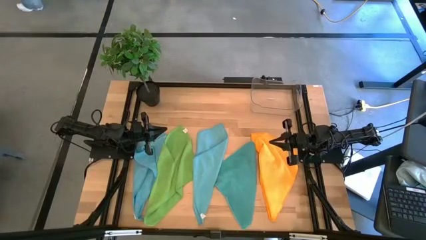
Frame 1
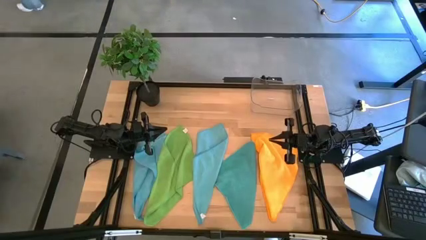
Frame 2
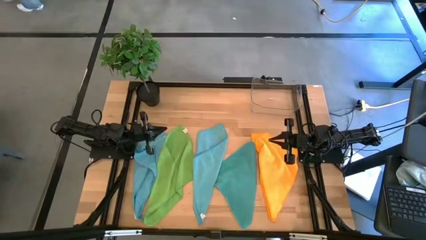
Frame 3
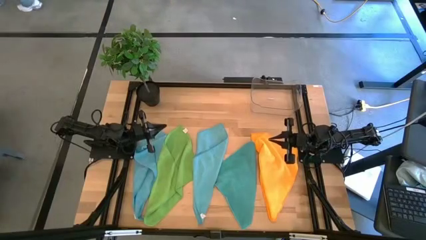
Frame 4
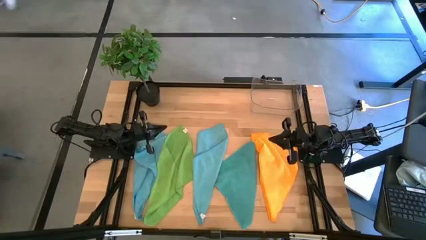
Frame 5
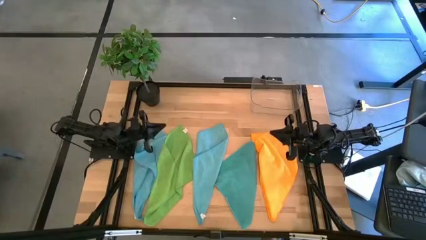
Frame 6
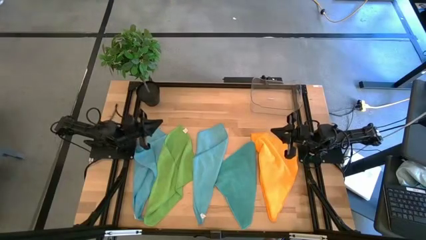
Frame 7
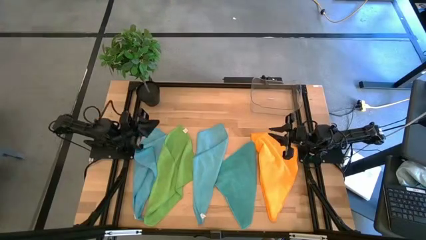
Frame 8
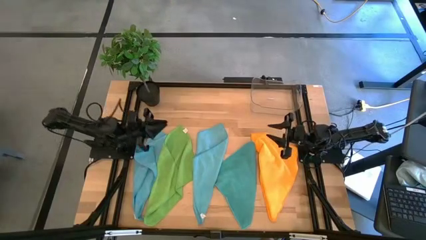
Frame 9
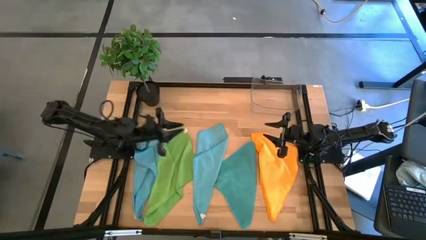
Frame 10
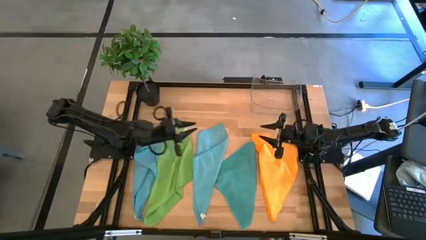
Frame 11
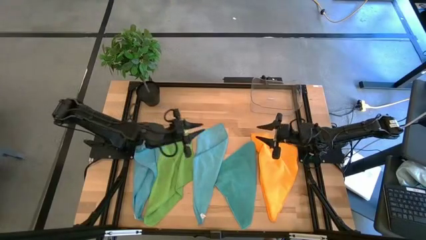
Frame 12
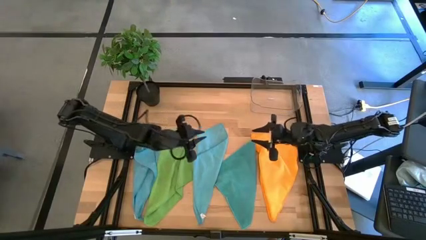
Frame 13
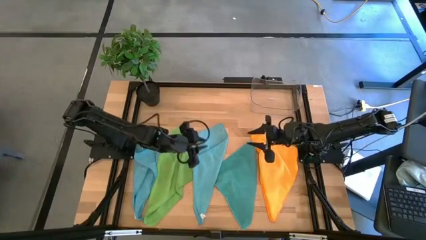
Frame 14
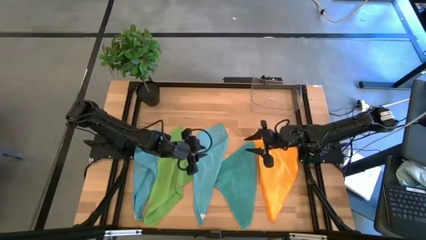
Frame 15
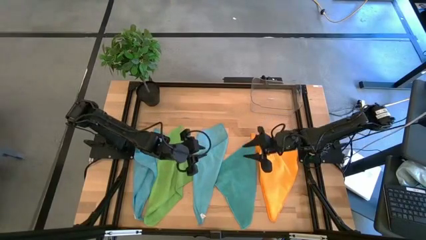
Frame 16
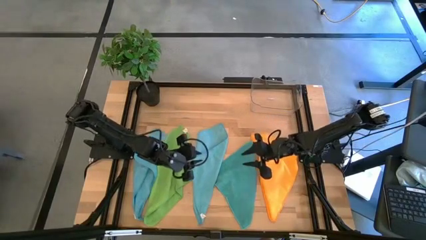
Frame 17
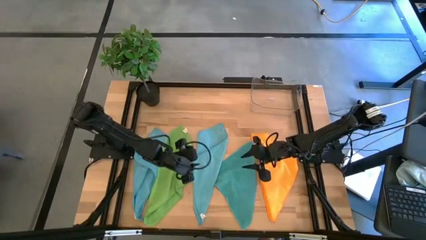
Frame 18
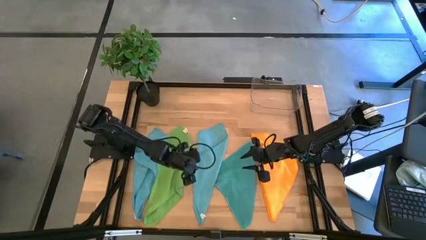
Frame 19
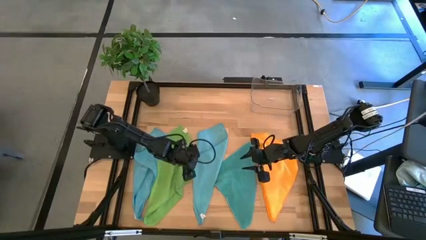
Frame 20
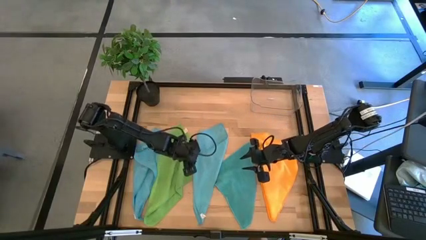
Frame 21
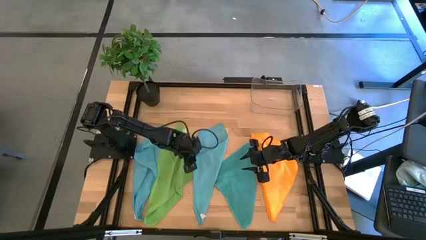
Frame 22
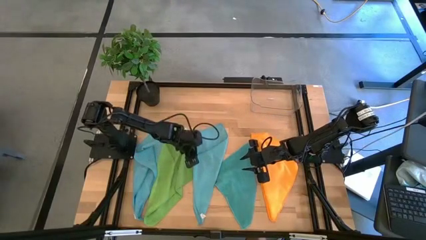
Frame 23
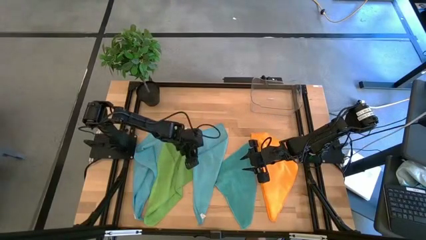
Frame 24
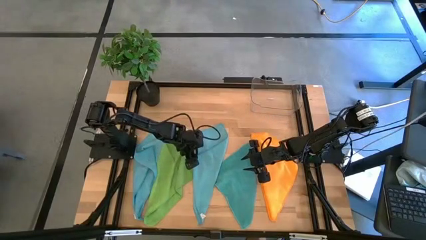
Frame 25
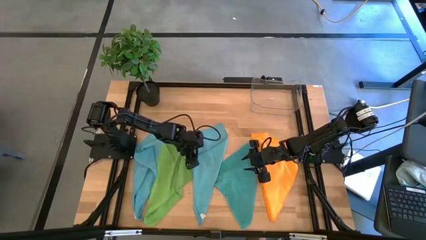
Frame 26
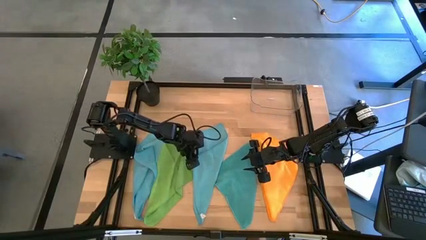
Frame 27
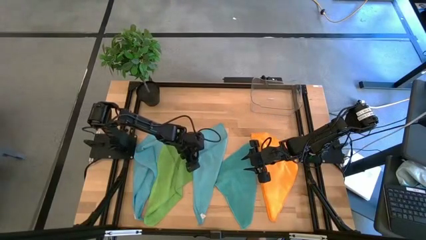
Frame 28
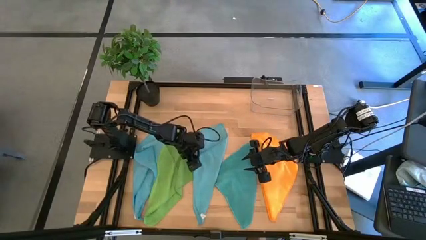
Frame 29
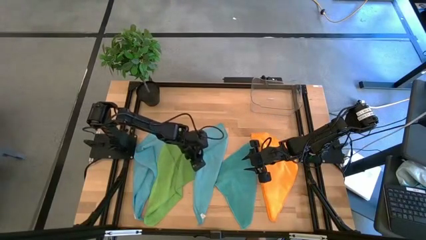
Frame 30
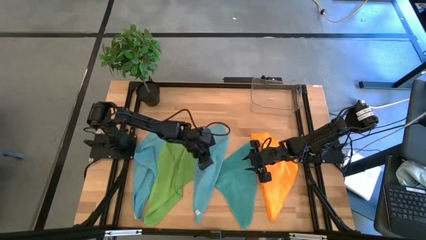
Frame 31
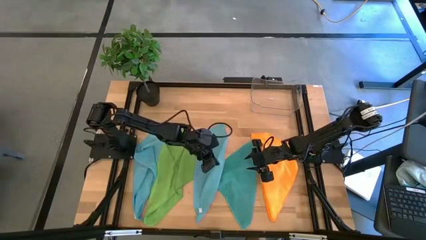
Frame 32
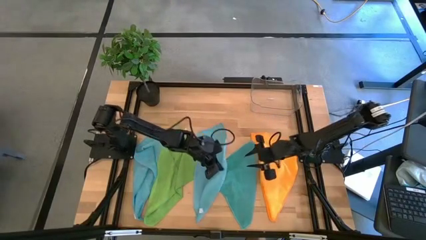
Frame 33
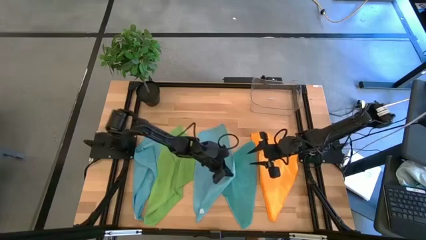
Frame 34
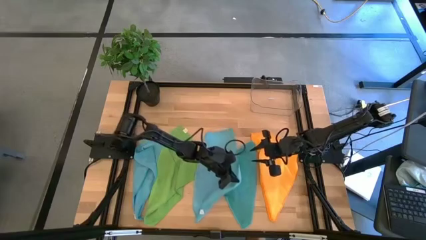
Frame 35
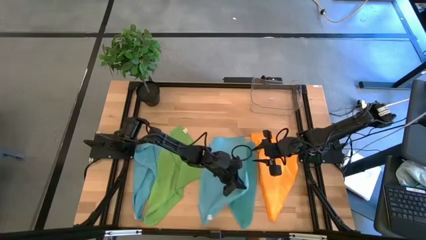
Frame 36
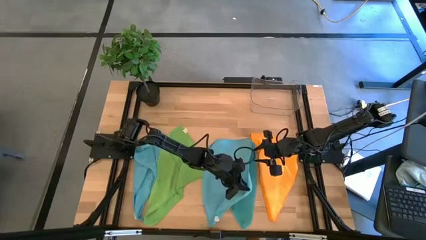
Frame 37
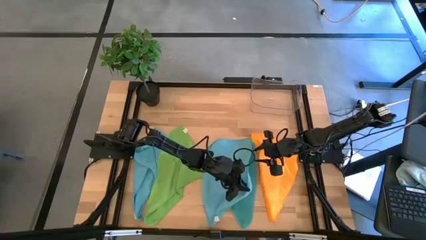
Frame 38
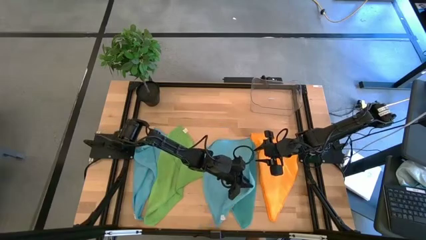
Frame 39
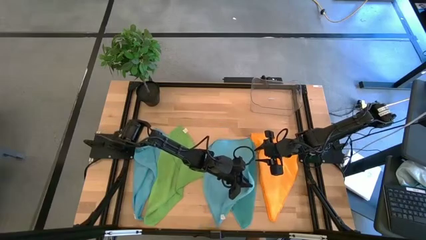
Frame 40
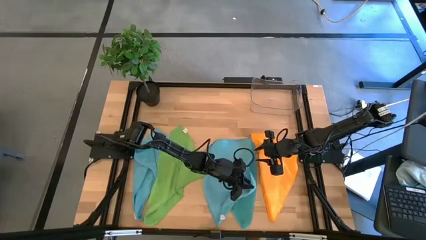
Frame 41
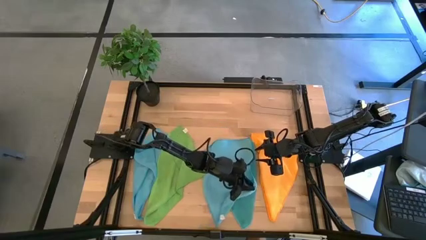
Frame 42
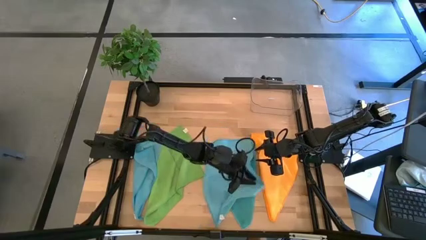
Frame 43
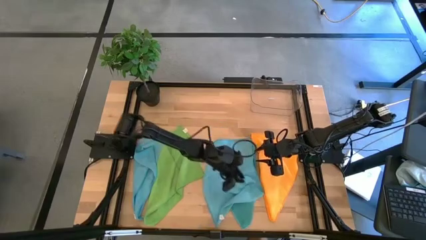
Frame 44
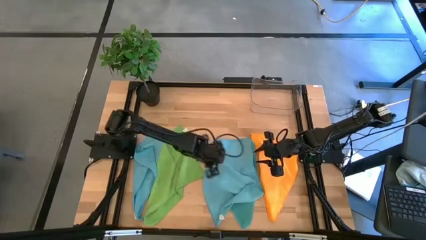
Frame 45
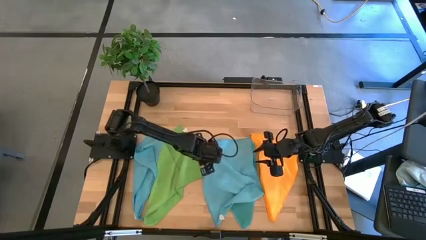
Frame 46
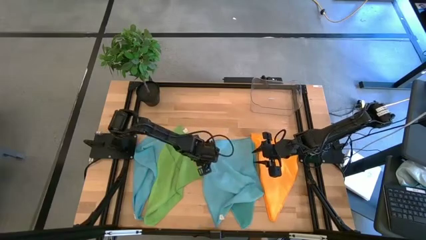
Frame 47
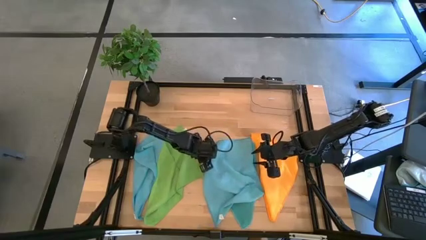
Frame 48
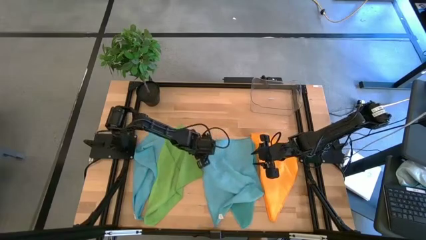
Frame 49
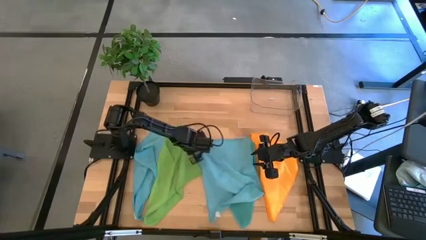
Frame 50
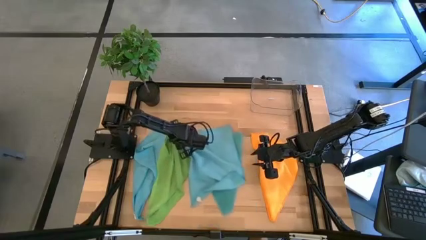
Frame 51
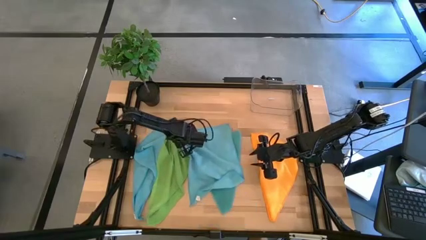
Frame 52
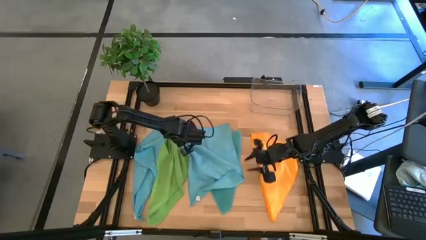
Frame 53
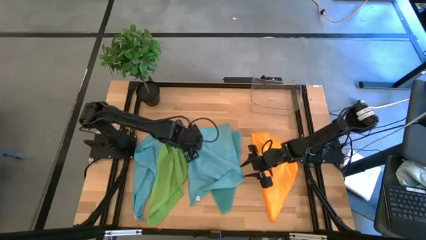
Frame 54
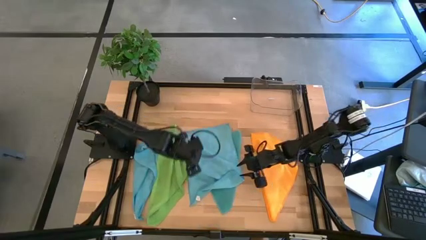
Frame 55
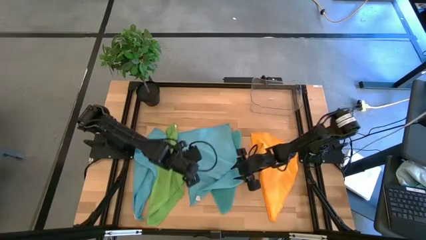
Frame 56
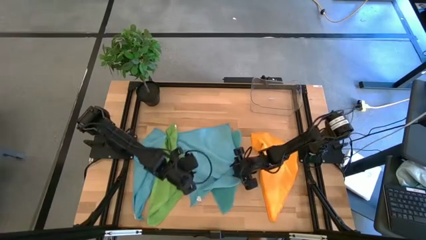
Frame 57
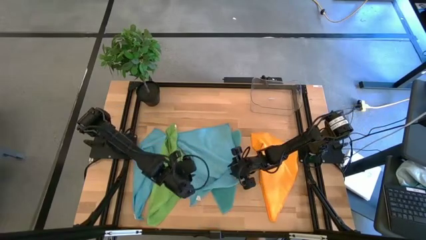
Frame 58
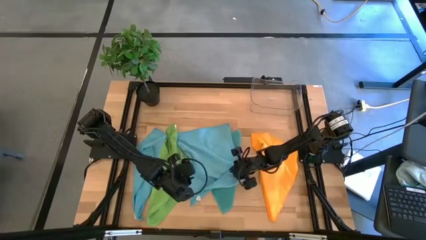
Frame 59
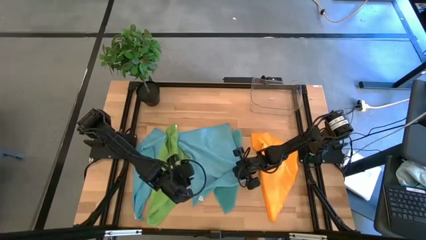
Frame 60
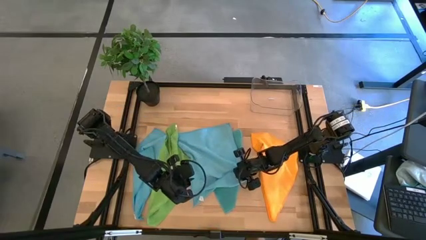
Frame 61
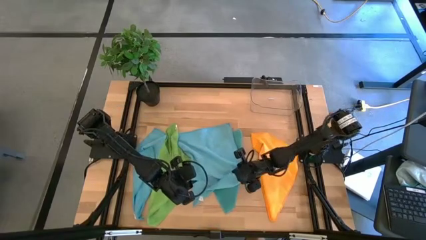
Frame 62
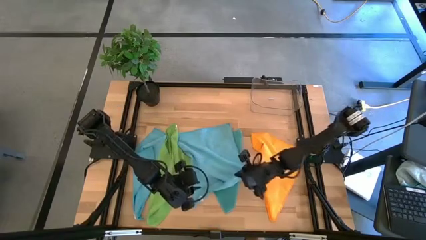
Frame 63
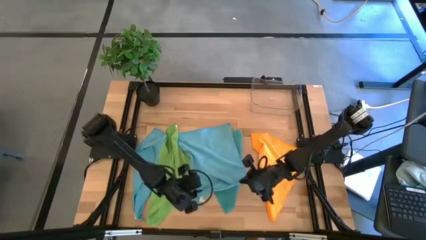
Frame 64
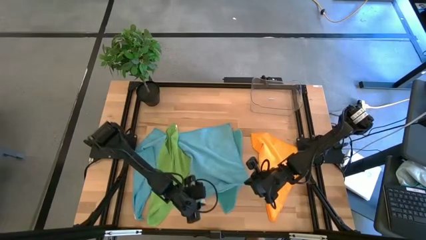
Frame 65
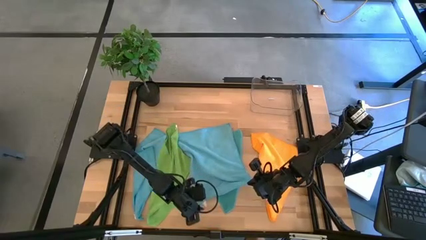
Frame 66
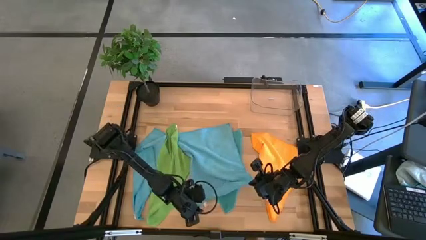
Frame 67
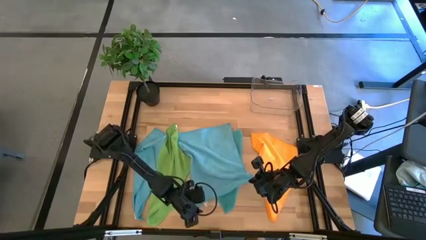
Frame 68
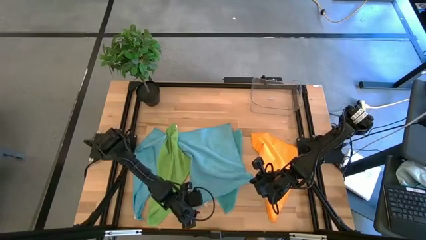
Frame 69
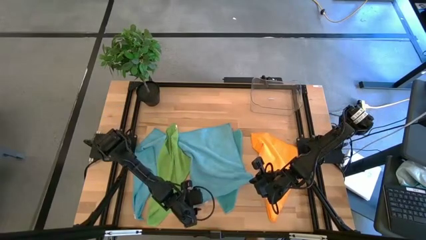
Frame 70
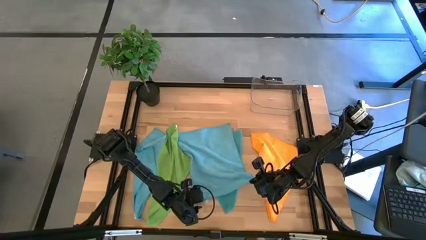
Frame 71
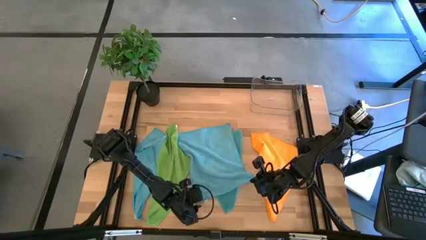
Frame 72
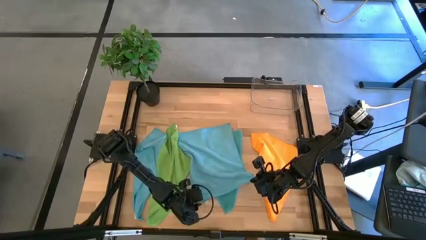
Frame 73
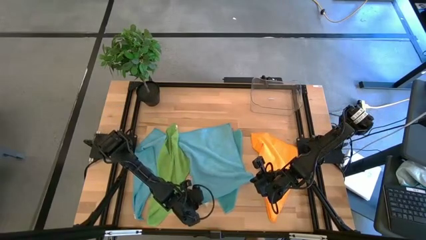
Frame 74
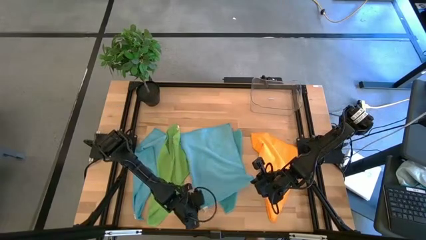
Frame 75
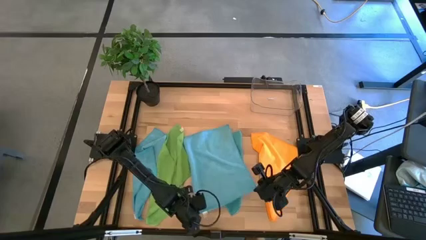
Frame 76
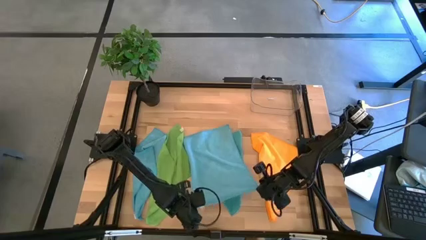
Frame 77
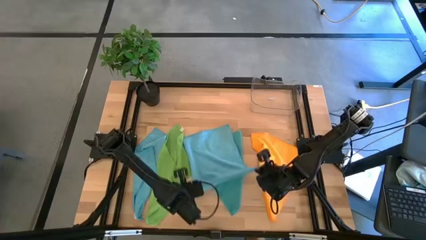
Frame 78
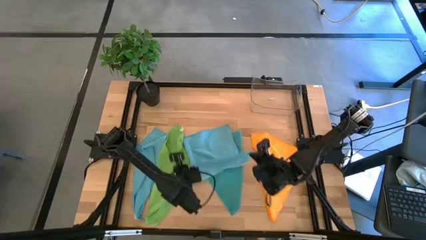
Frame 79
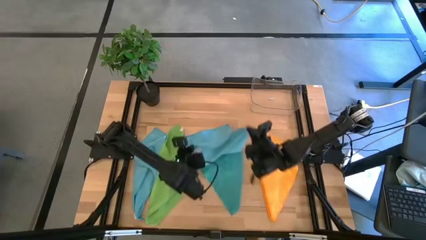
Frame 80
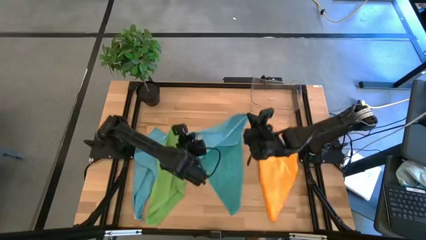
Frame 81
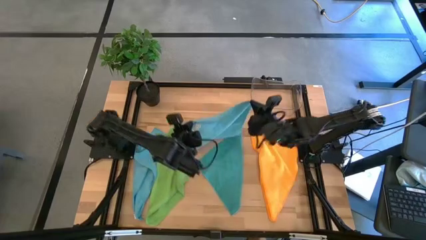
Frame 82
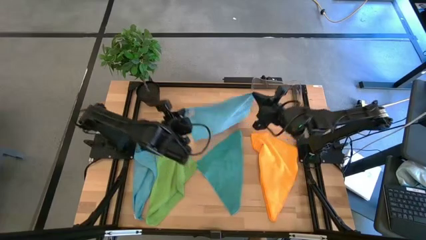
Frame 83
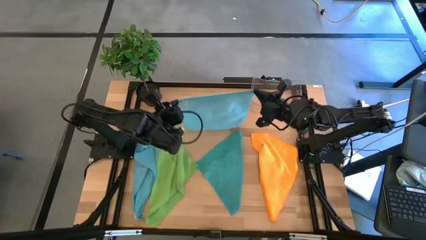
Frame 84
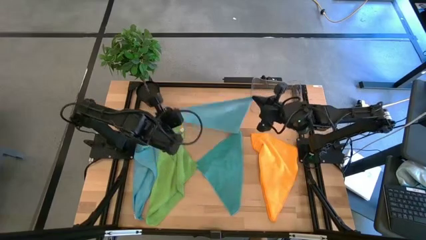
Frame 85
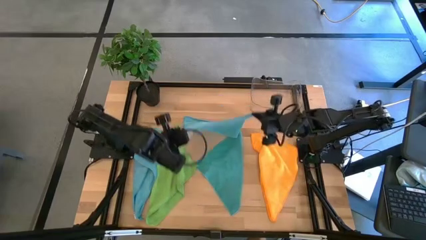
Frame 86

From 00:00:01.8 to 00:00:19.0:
Task: Fold microfiber towels
Fold the right light blue microfiber towel
